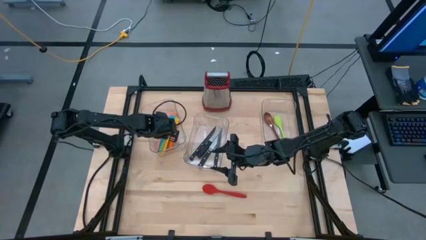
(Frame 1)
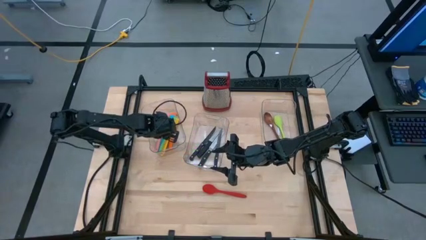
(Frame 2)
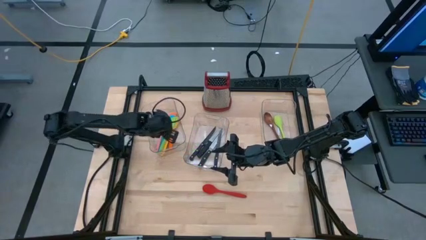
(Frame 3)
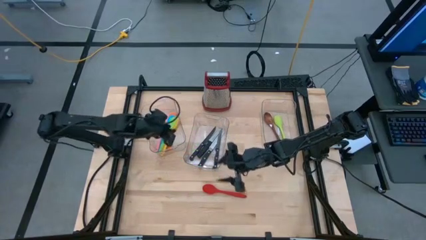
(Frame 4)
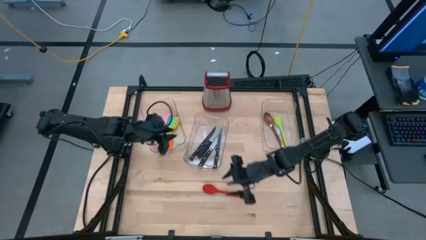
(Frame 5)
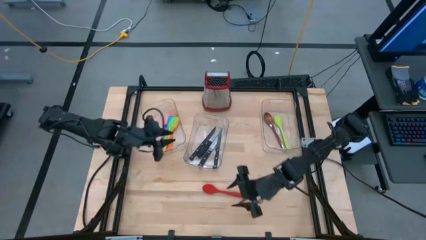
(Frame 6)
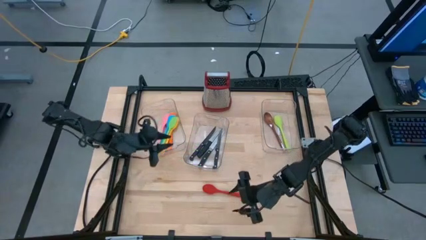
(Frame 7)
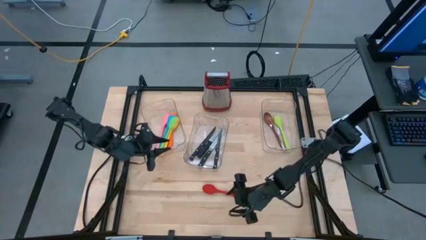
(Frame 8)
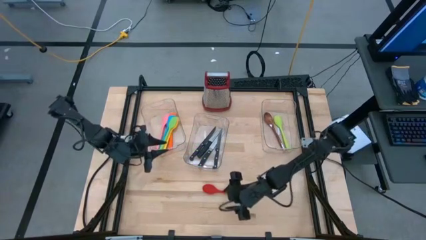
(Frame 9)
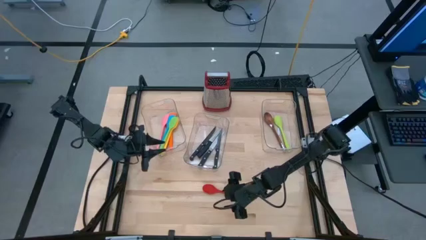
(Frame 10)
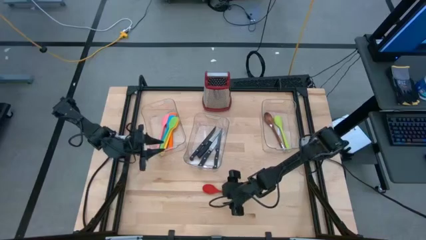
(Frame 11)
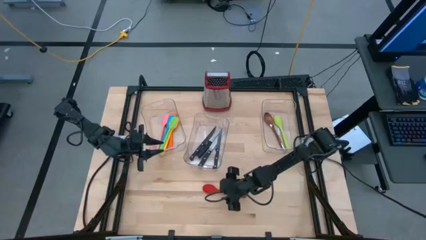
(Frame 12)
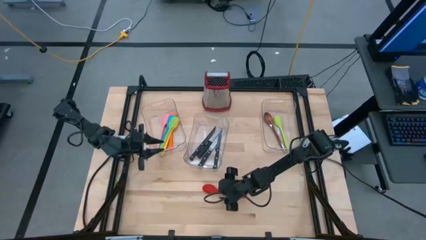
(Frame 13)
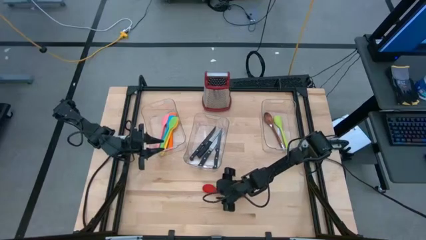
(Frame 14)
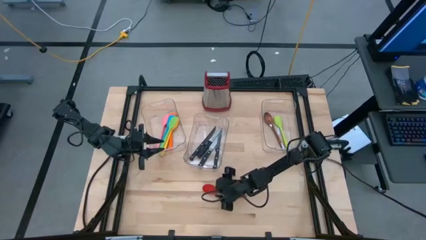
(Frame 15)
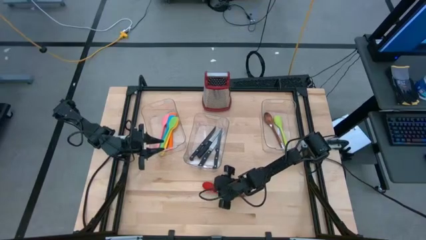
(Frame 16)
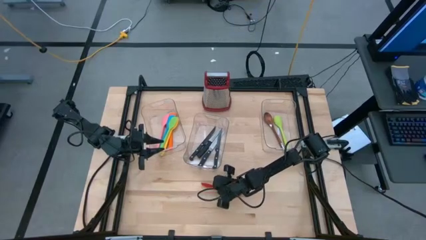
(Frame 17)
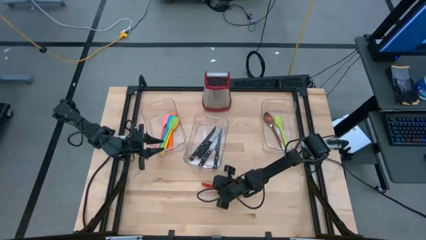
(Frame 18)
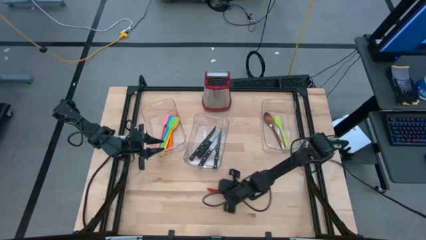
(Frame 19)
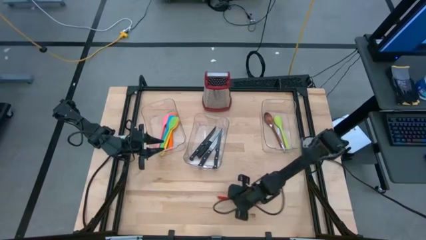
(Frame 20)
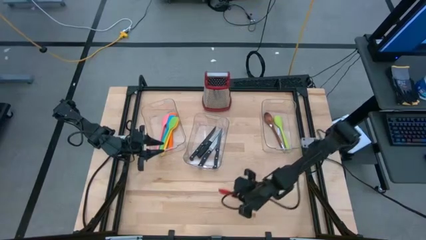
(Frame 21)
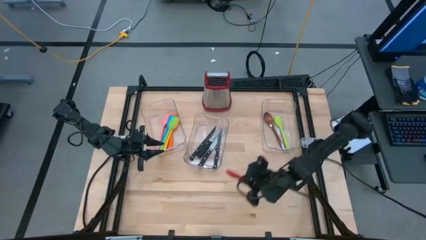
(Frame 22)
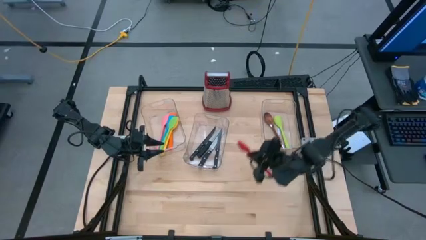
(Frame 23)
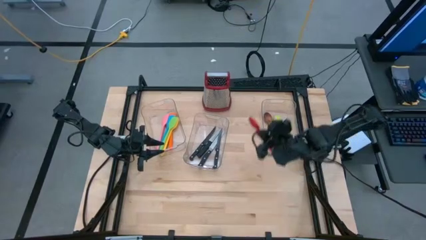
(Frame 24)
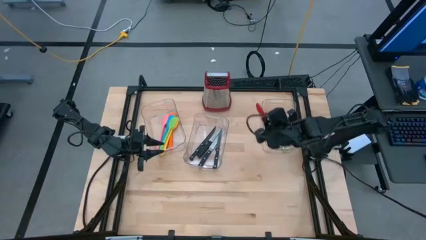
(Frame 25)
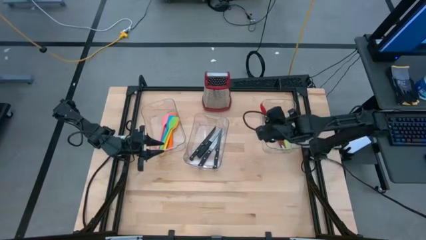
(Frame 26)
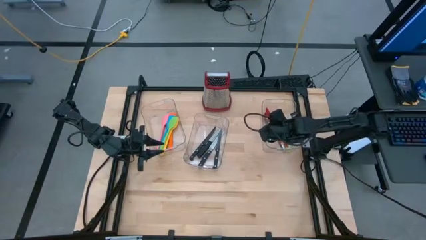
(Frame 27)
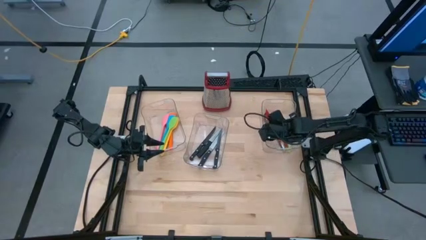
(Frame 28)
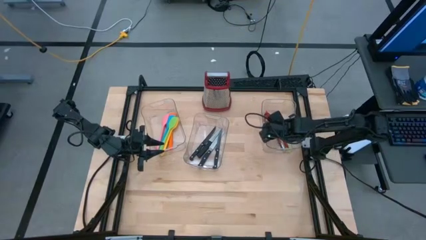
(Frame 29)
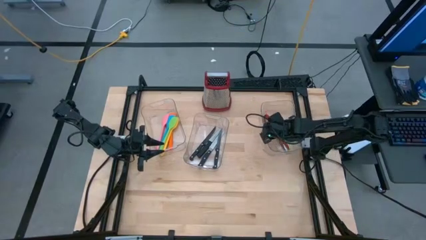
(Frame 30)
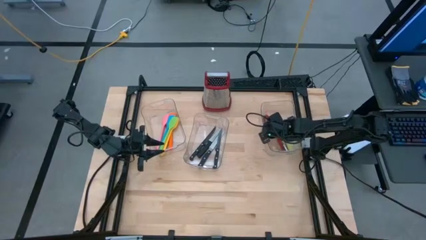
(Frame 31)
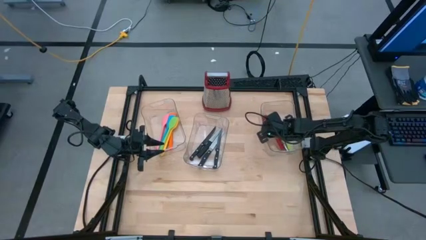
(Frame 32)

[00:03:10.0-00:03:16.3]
Task: Pick & Place Kitchen Items
Put the red serving spoon into the right transparent bin

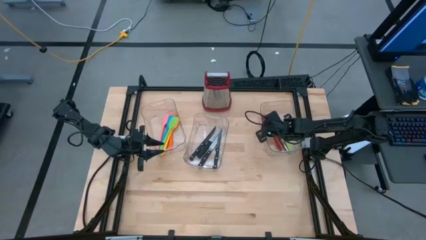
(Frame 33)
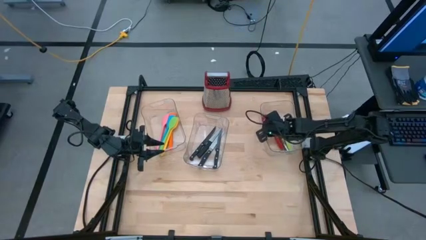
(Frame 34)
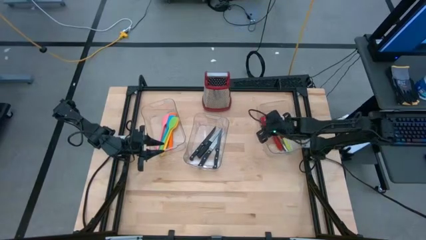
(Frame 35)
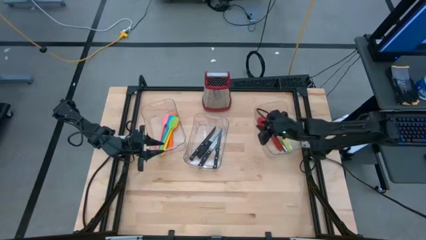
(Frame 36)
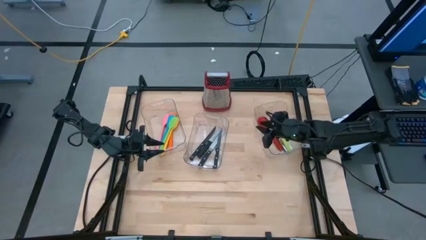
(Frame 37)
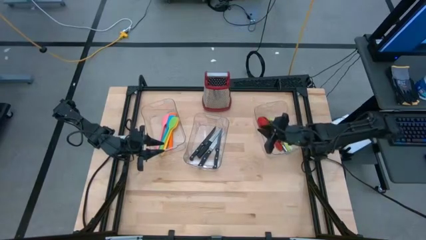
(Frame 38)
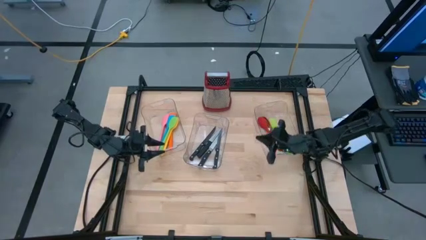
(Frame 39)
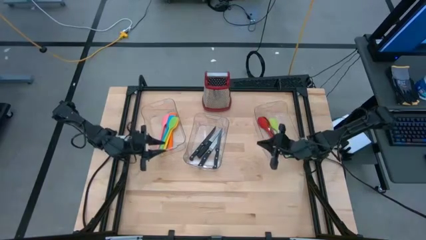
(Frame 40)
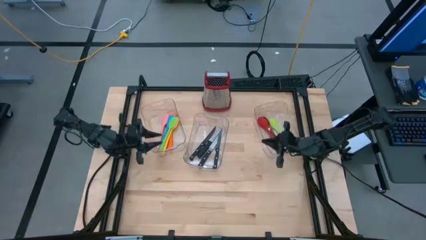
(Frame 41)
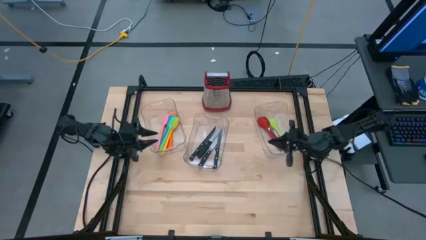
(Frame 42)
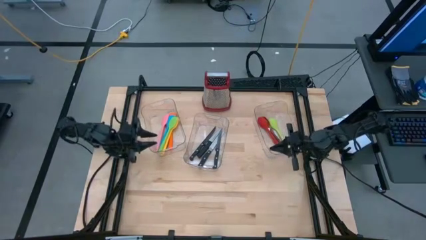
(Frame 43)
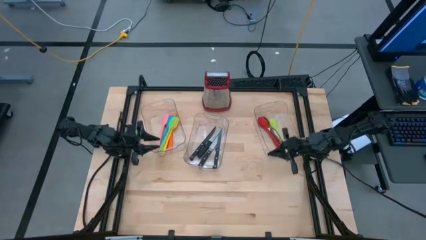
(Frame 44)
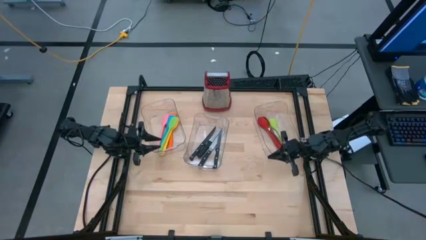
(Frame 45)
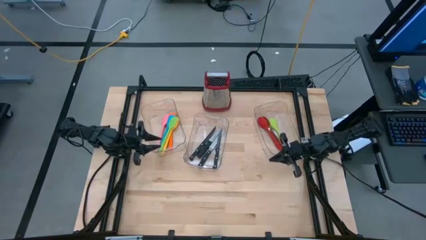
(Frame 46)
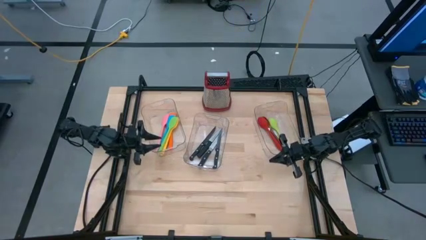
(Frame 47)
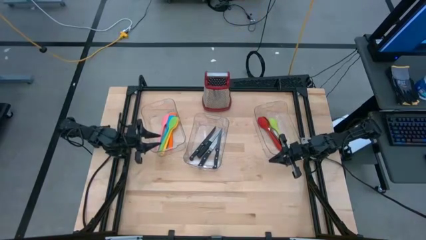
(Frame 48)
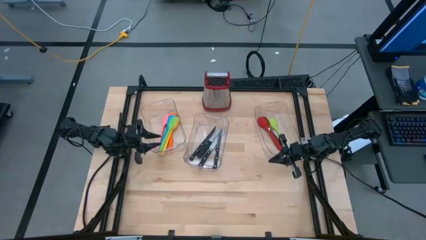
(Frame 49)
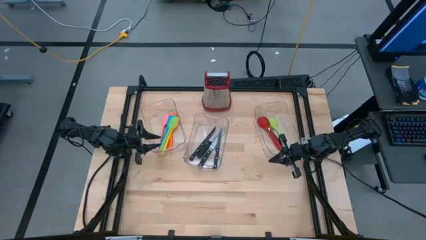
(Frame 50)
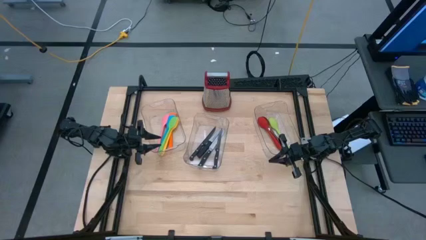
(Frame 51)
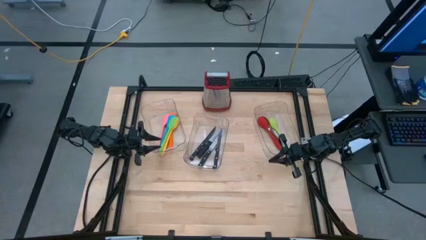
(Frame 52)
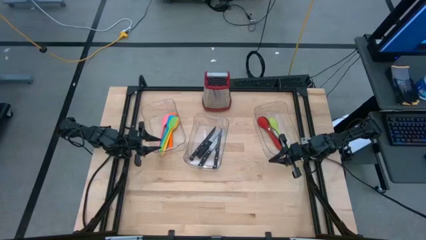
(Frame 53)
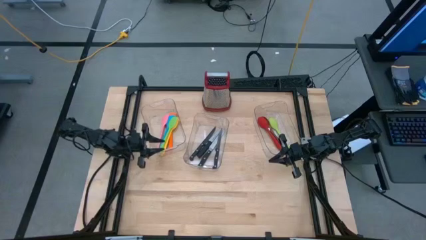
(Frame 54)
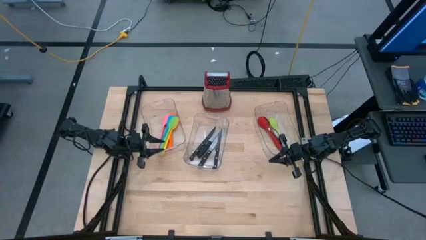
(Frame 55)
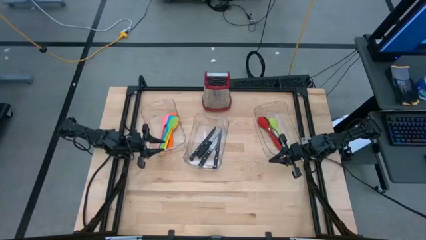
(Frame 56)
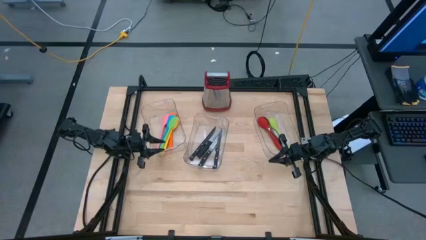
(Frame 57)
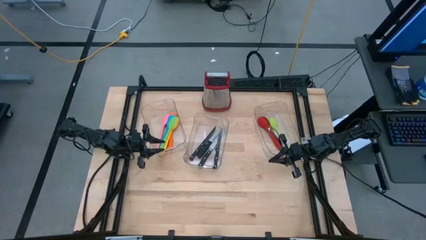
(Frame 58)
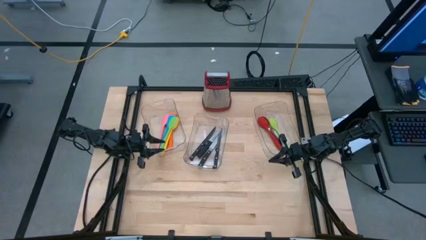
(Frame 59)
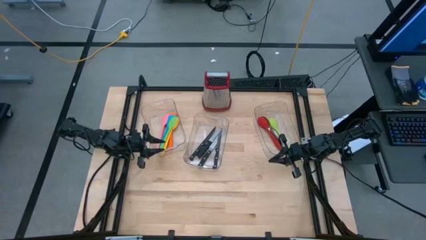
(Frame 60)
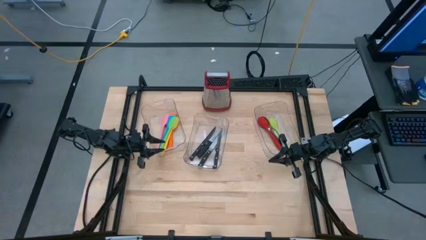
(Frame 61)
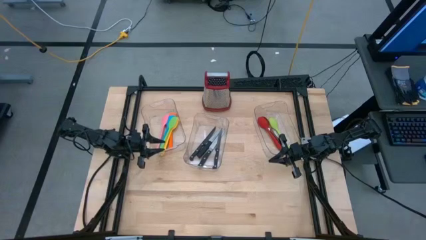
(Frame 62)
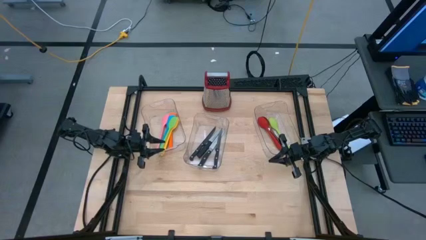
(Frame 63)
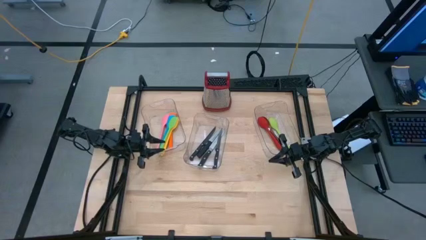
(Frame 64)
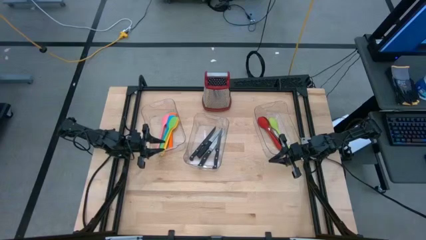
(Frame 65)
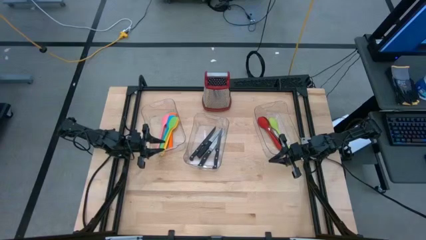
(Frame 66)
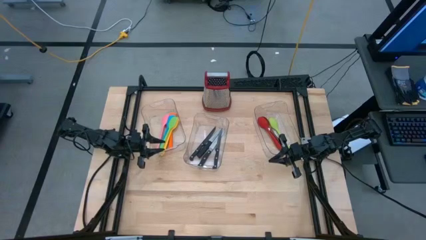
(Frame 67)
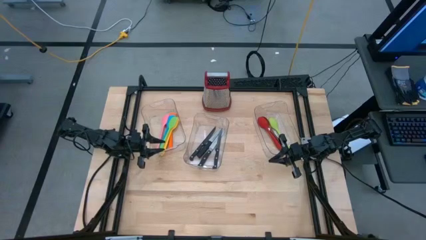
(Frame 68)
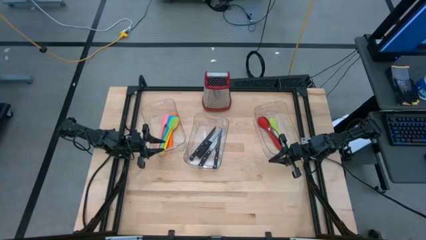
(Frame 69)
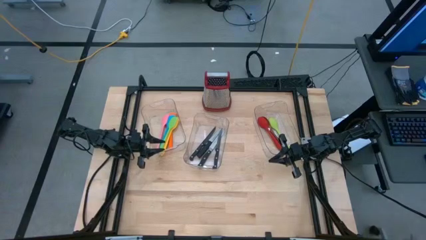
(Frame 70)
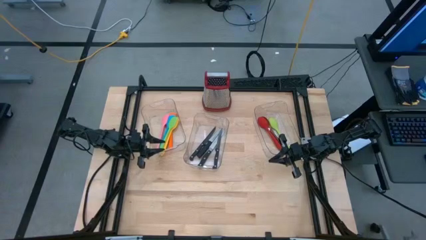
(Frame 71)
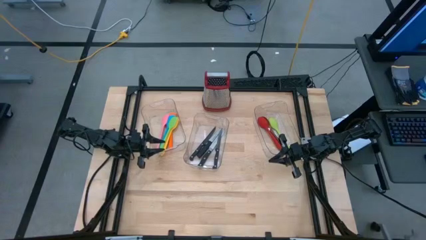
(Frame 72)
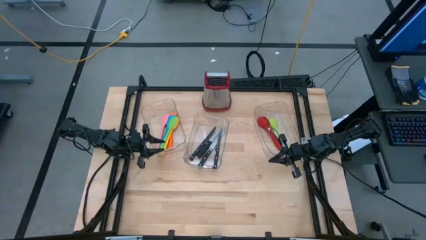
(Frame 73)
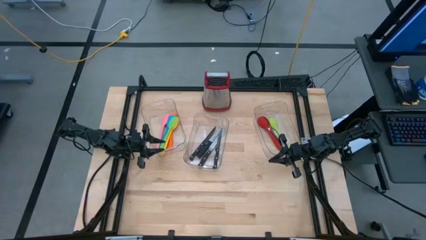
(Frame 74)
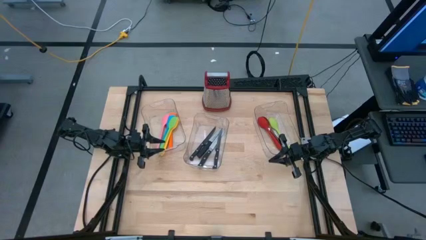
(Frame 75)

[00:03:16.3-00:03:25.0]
Return to Home Position
